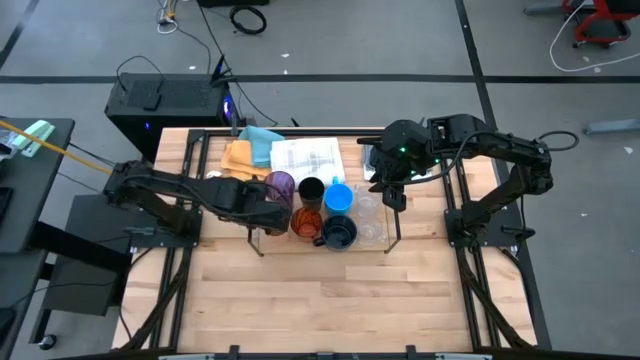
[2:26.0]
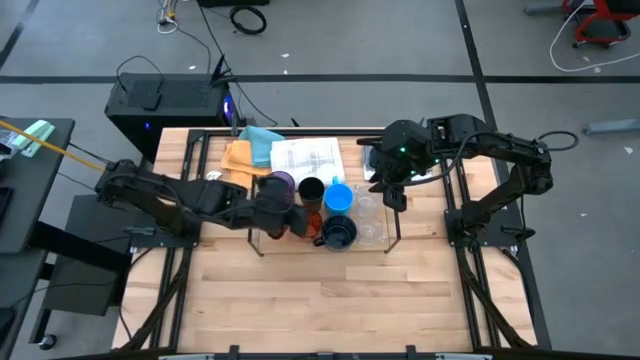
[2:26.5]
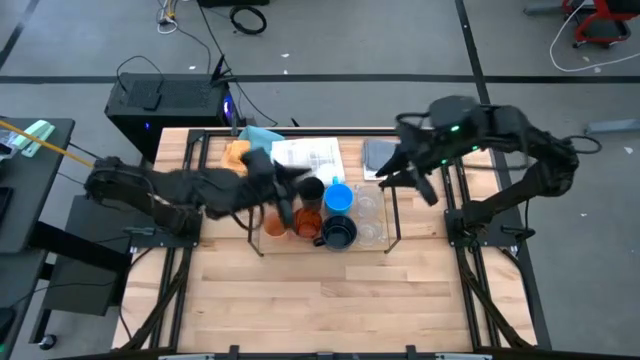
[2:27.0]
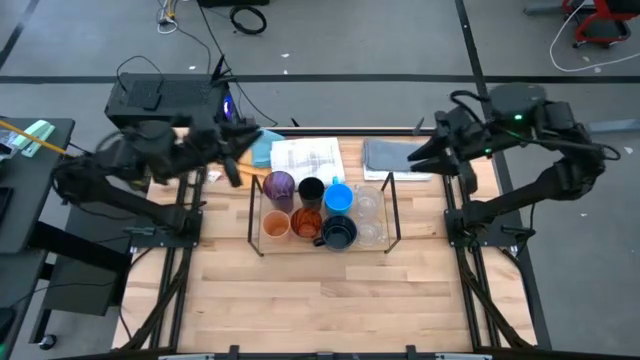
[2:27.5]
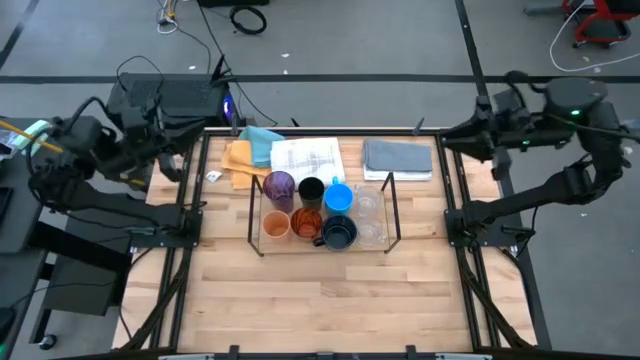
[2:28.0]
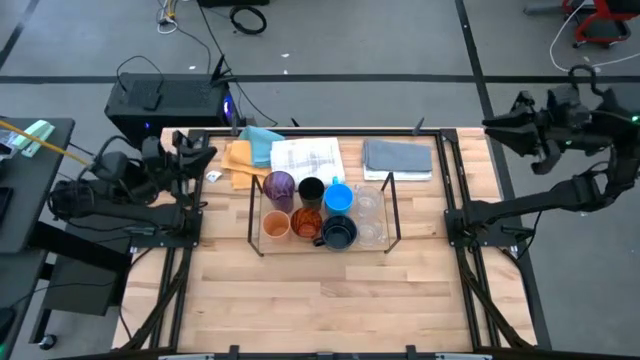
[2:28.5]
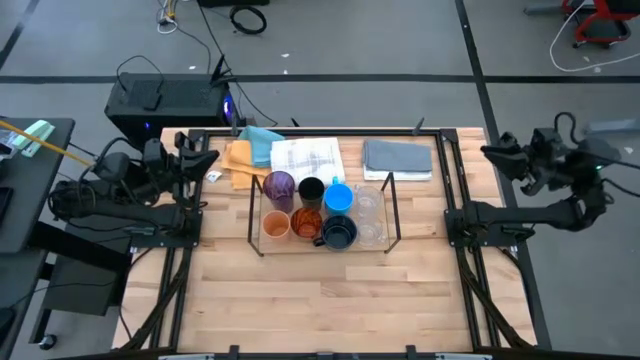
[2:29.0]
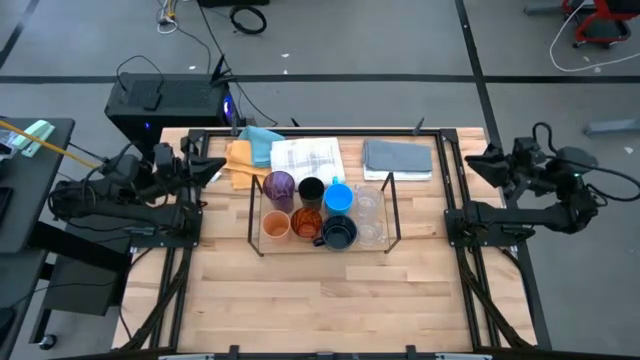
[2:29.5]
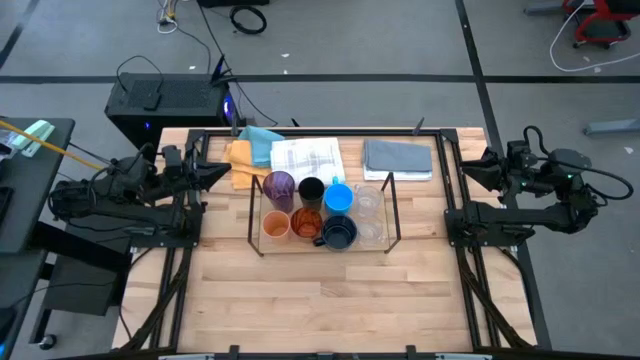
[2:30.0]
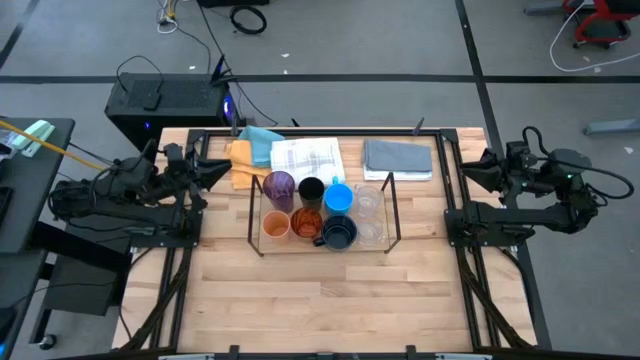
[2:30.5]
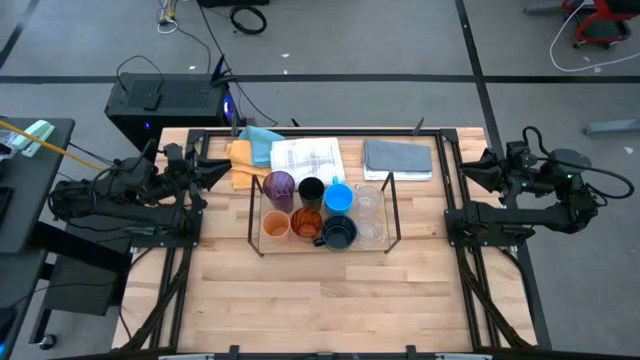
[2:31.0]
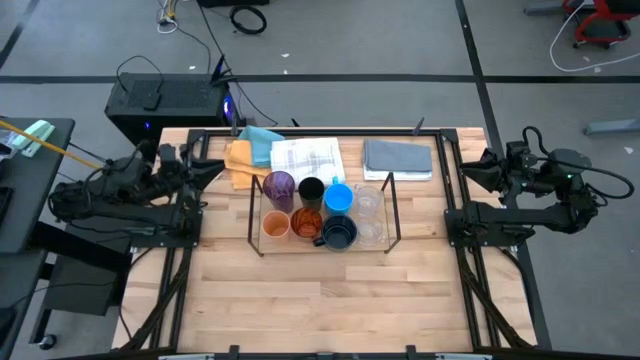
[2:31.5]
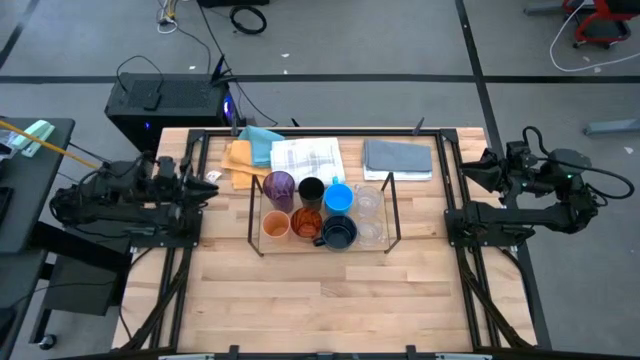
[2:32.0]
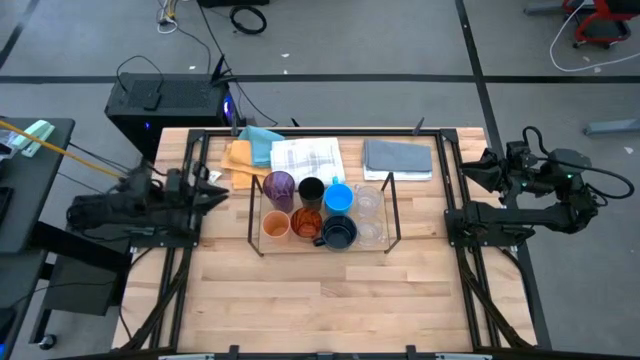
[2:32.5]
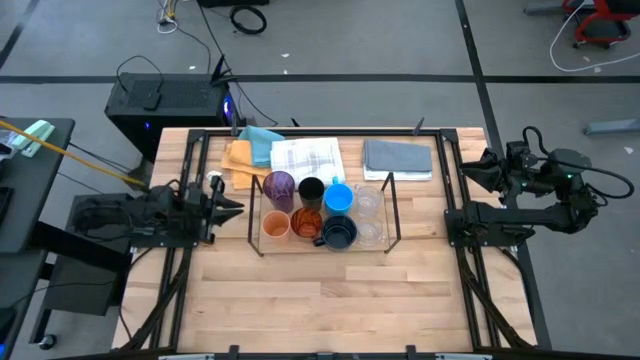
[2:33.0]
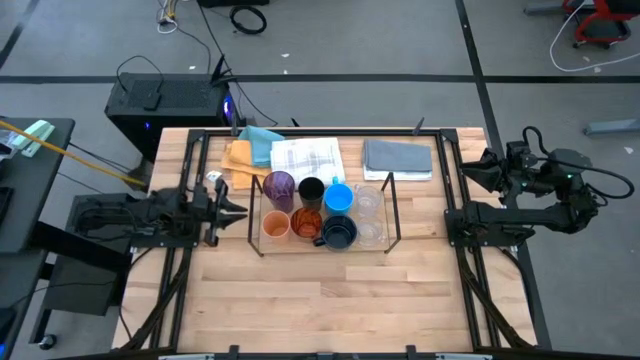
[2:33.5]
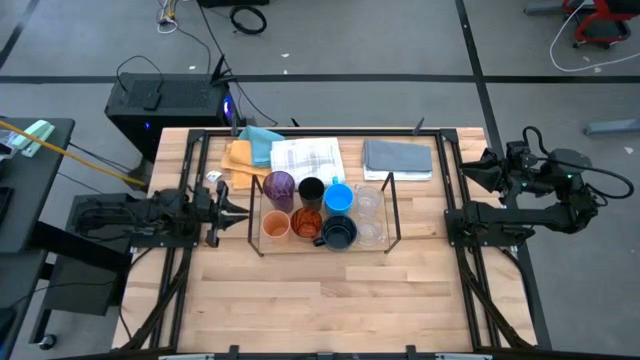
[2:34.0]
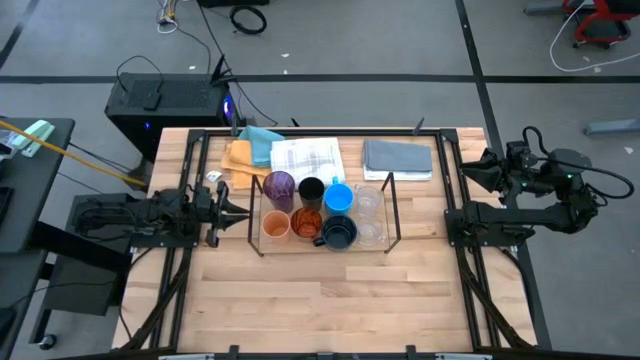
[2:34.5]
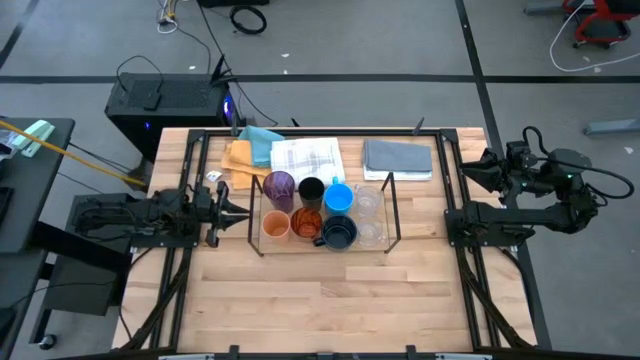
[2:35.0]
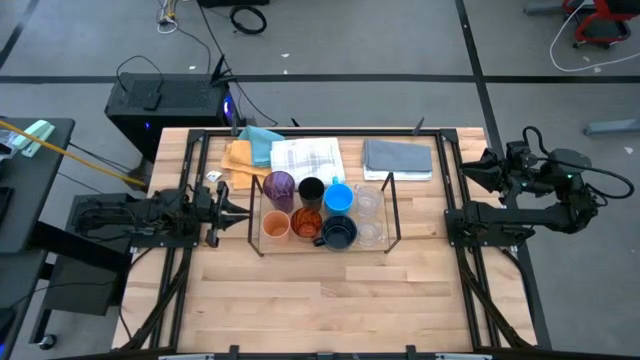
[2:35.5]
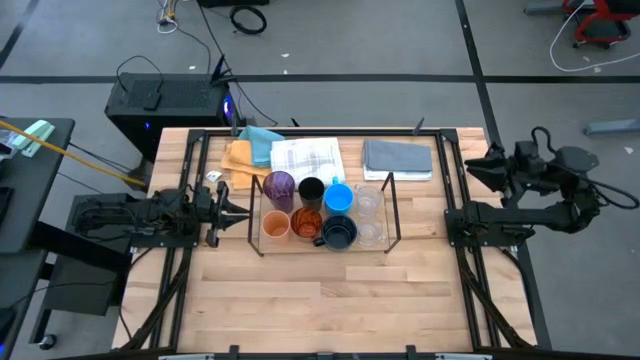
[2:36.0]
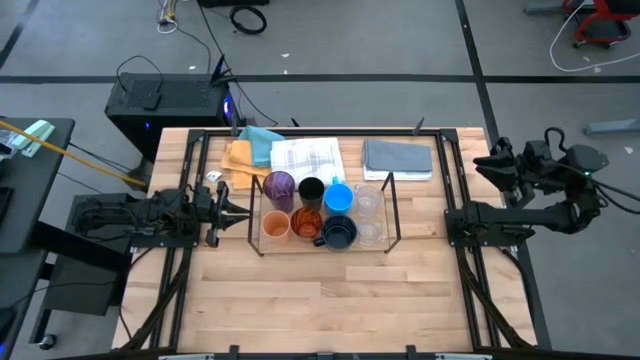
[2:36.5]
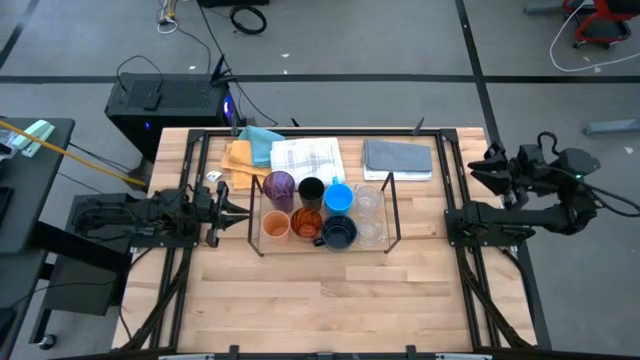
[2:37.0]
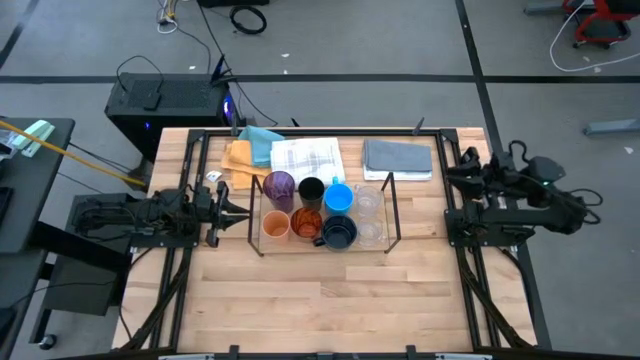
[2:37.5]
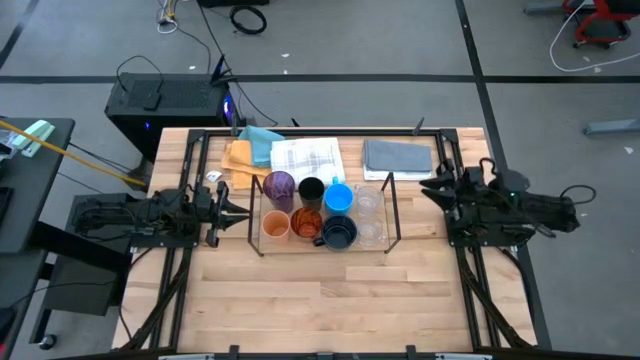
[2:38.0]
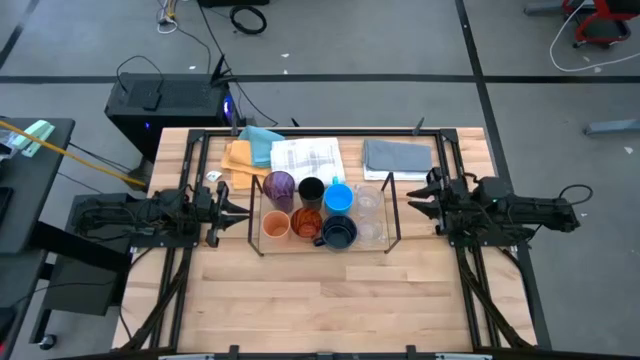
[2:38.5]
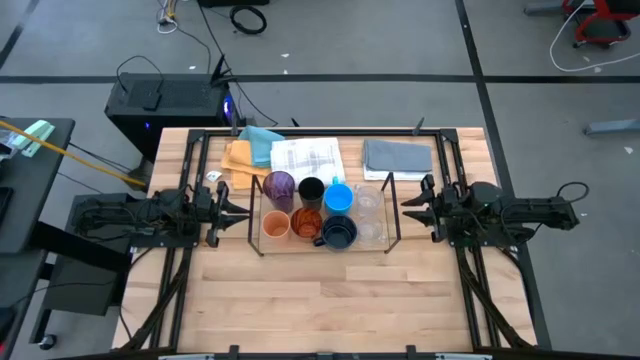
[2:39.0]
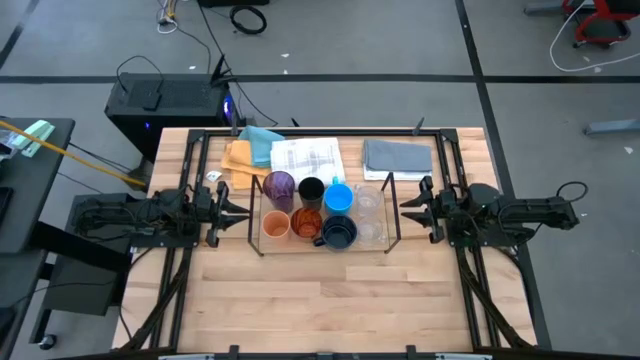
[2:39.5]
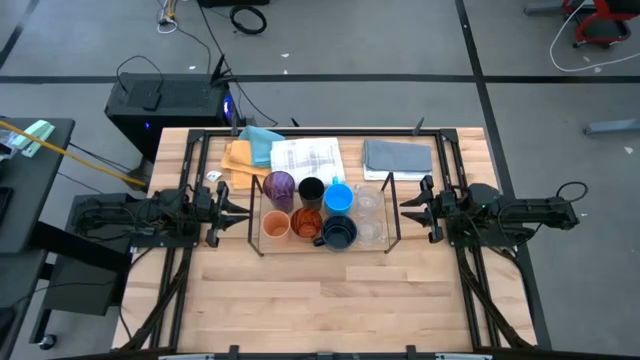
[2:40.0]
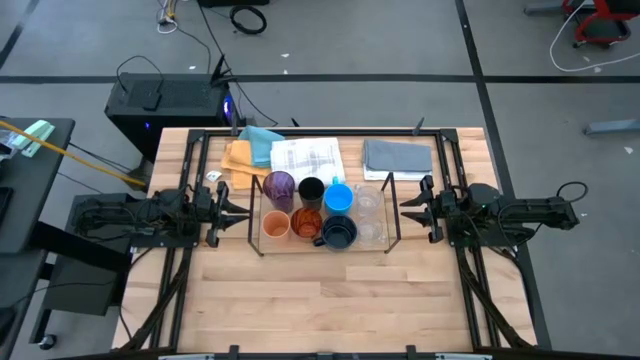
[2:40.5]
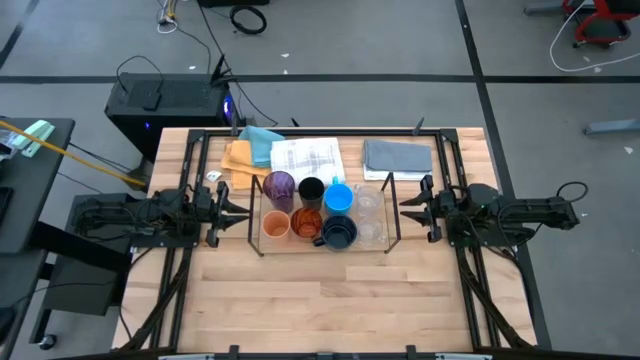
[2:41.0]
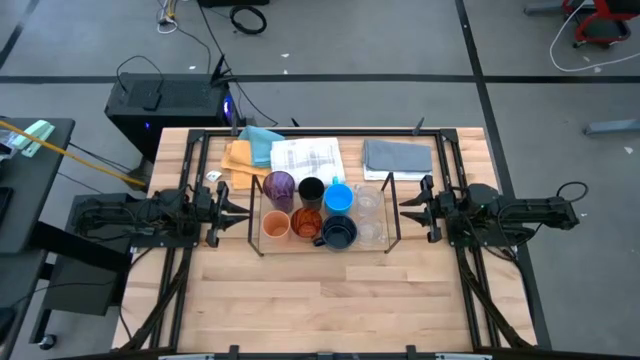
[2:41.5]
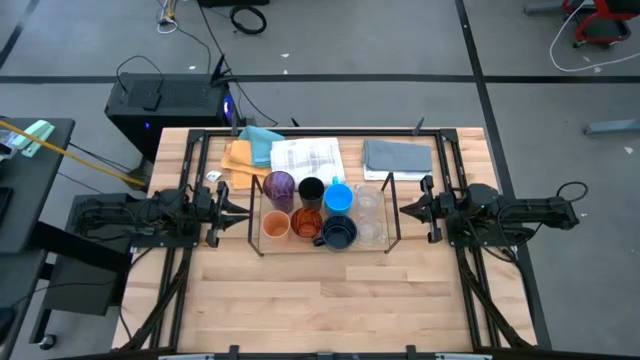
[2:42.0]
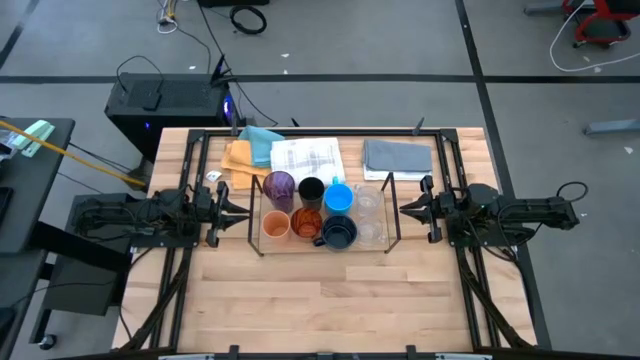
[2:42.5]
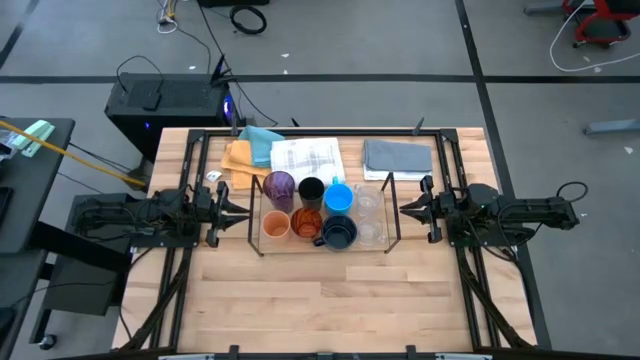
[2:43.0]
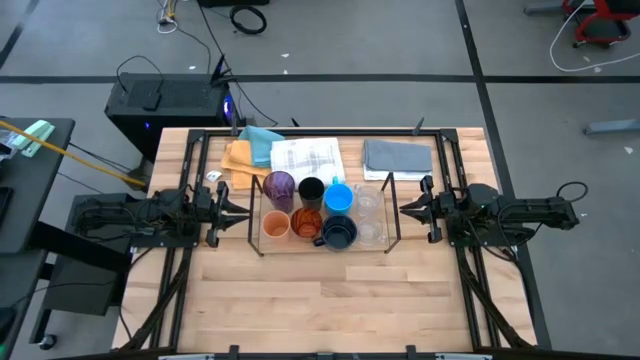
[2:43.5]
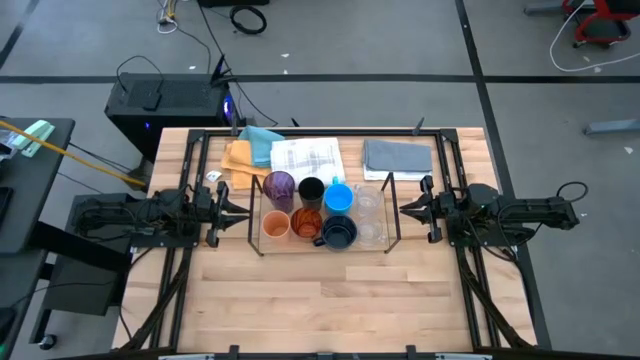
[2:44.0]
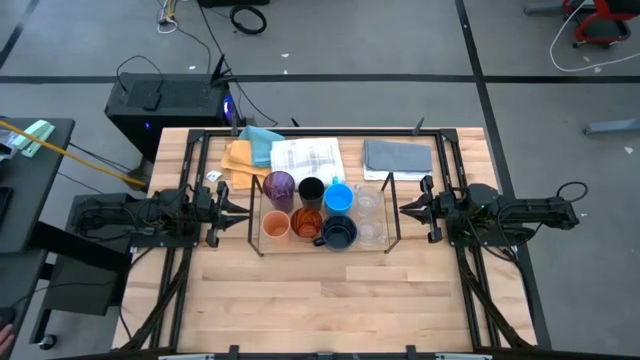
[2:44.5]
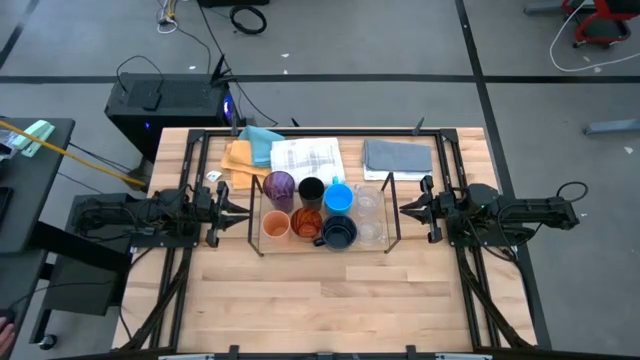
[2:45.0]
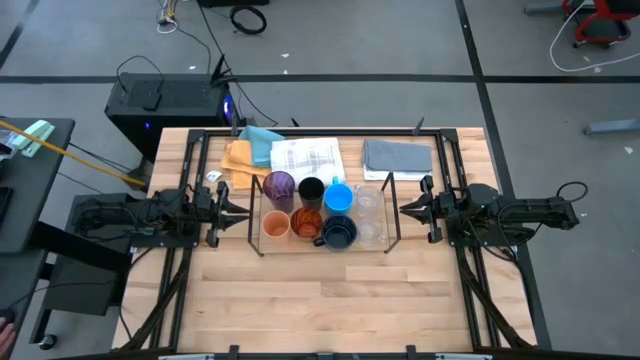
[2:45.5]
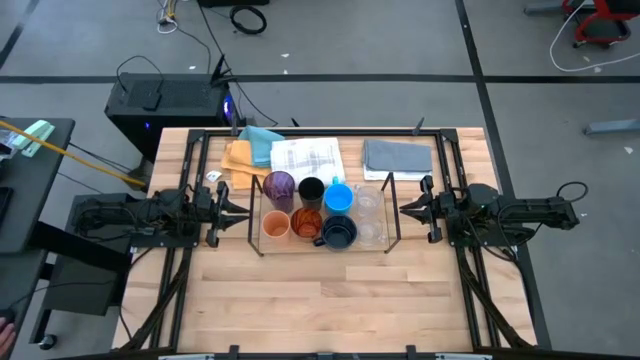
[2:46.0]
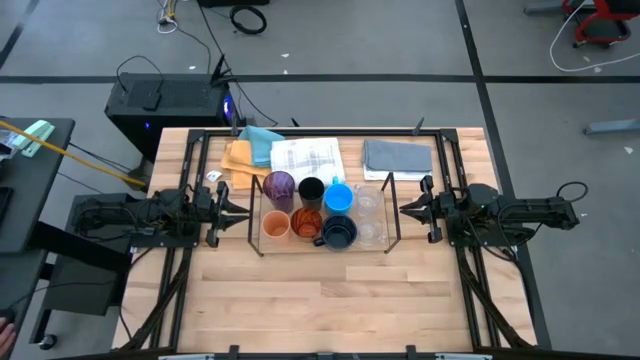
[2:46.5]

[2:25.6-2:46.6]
Task: Stack small to large cups/mugs on shelf
Return to Home Position
